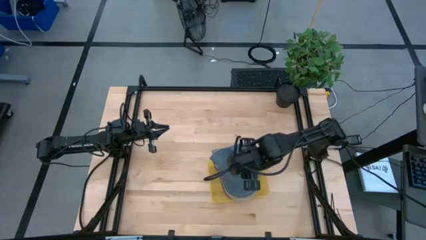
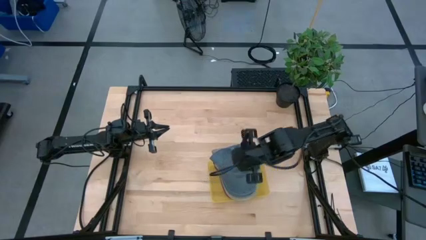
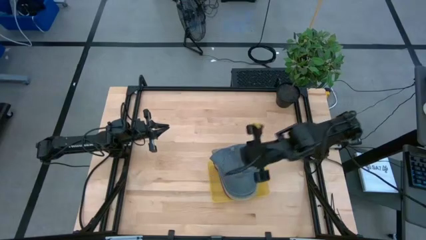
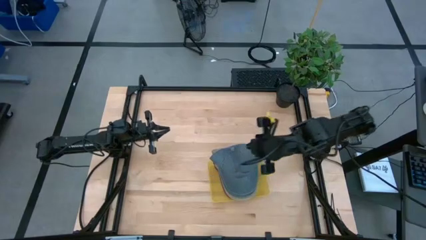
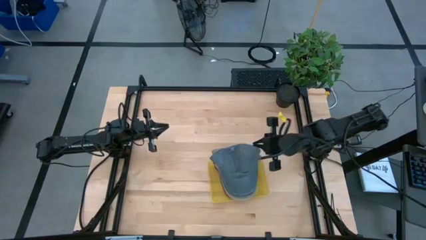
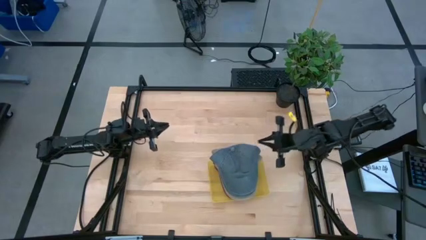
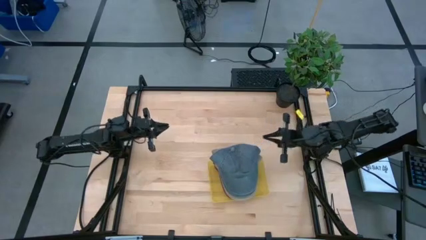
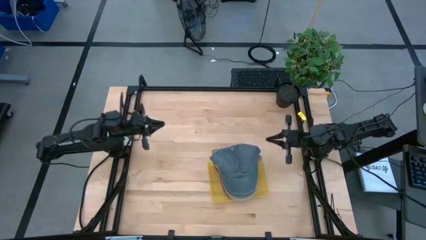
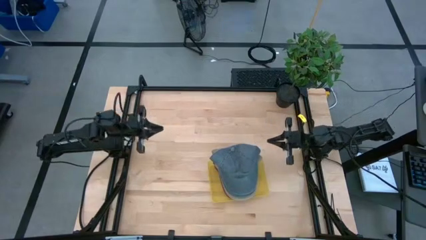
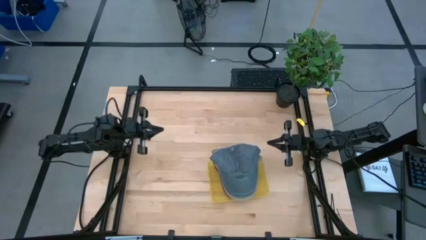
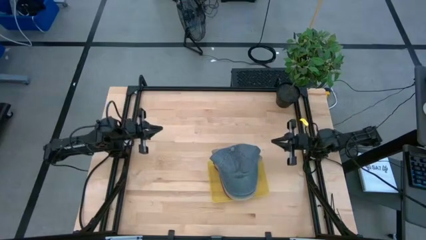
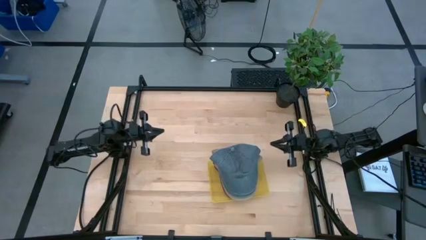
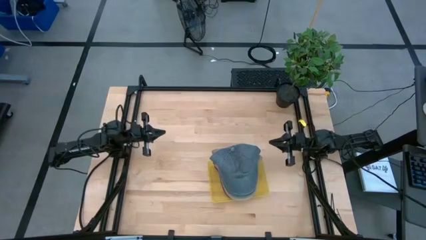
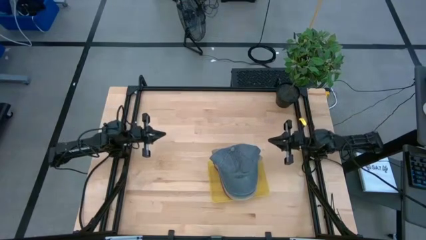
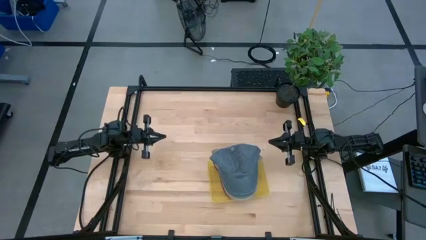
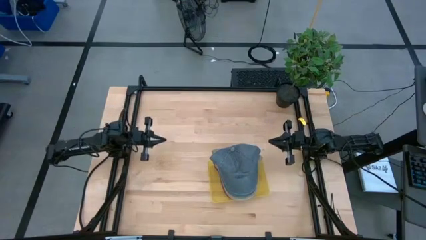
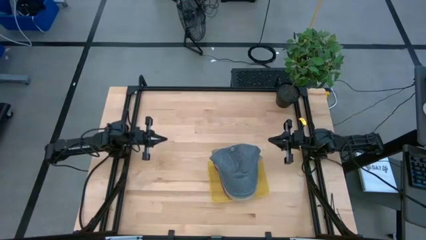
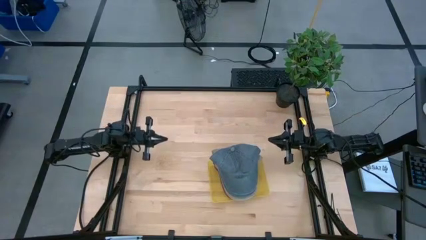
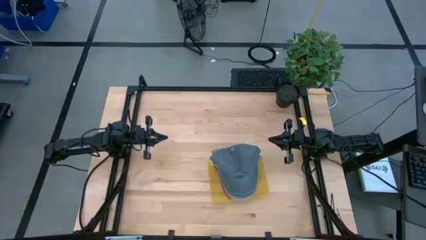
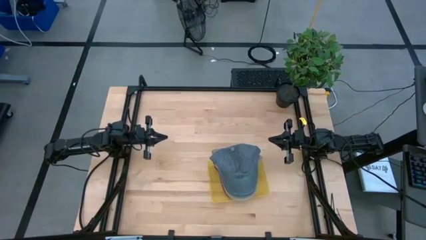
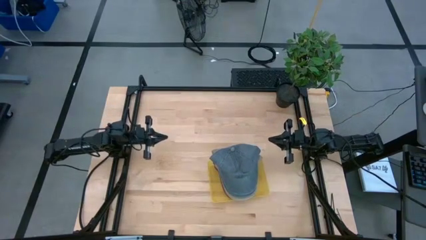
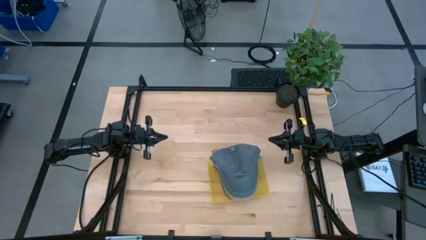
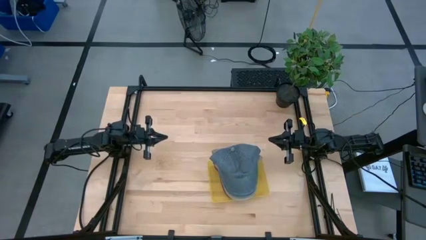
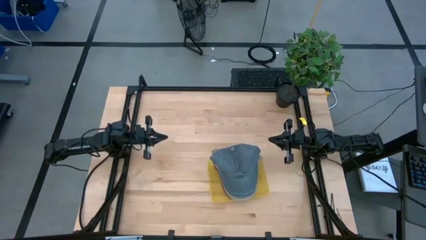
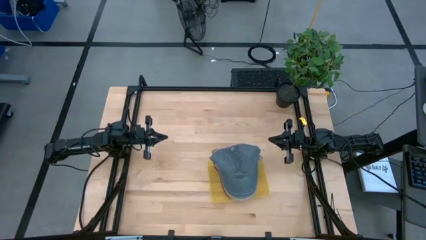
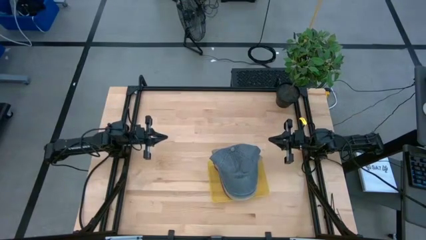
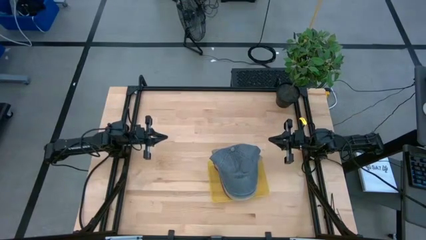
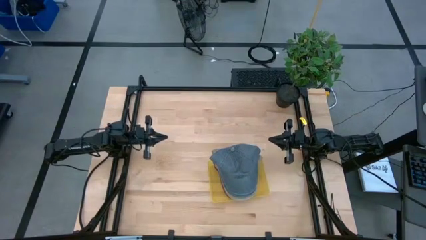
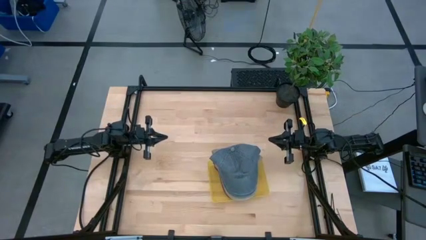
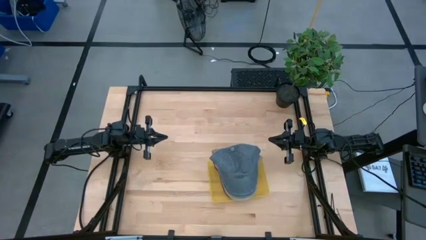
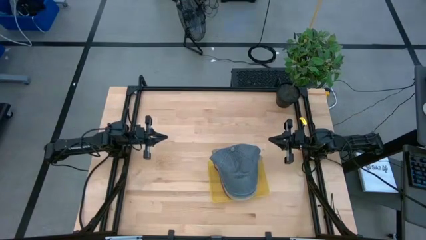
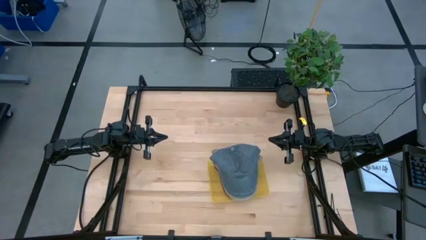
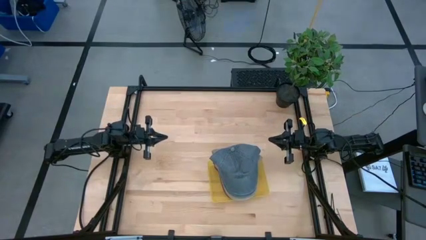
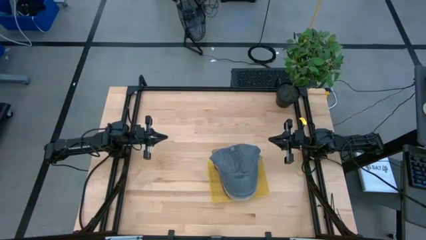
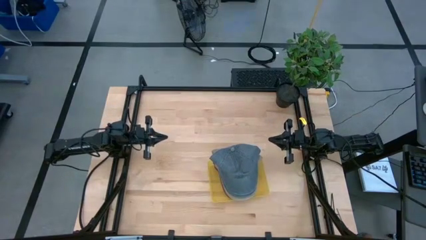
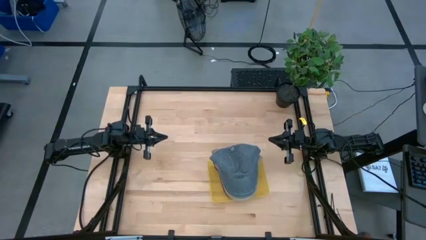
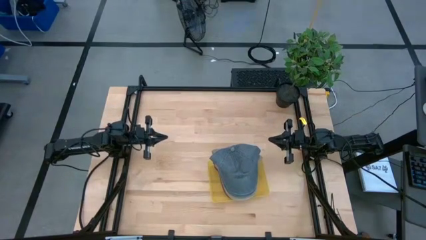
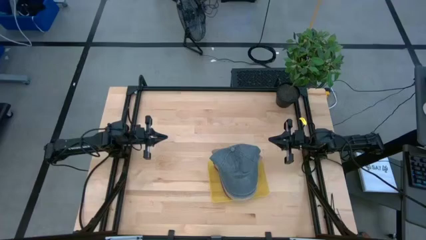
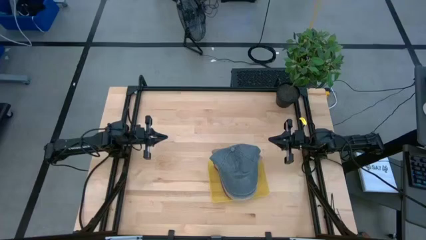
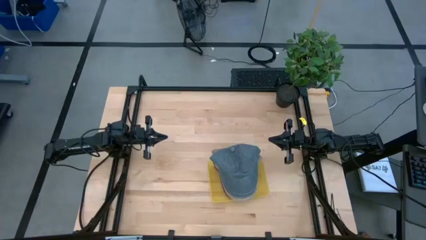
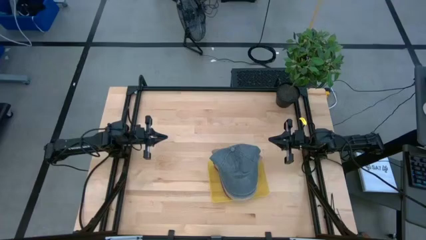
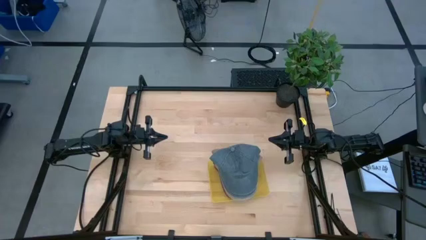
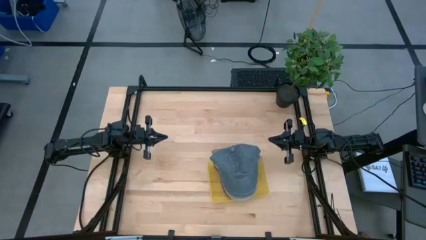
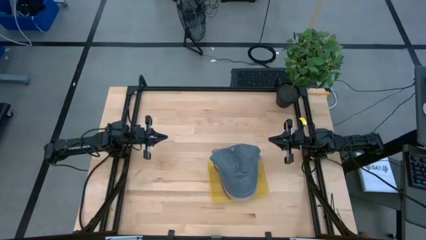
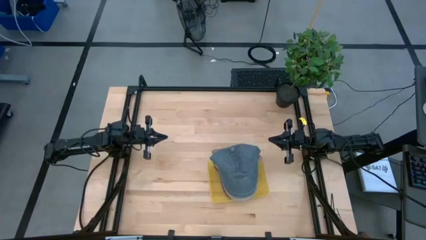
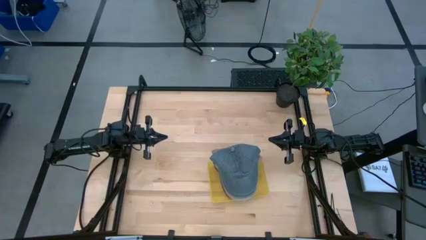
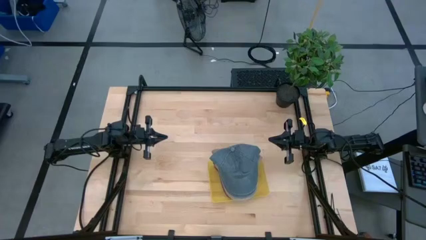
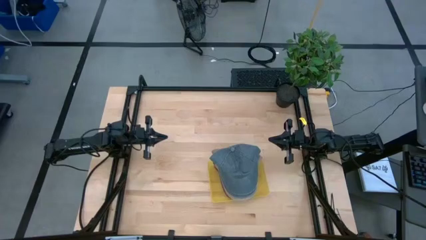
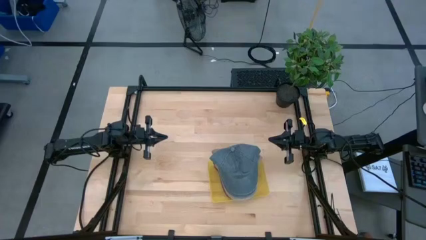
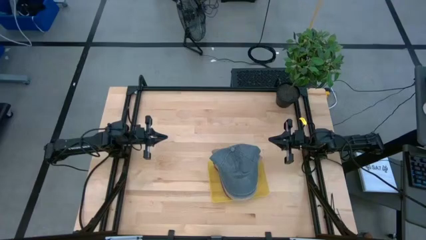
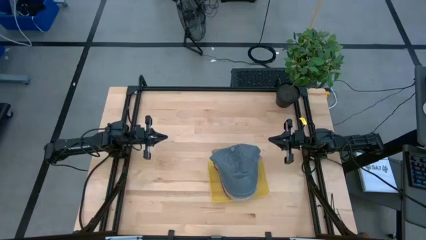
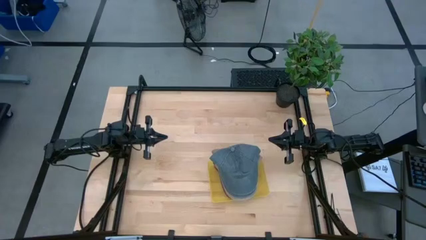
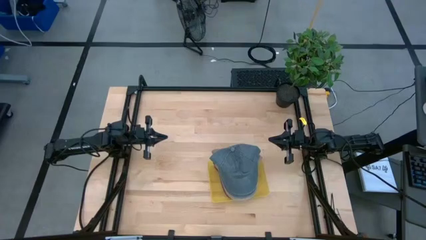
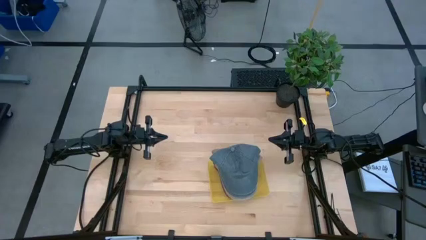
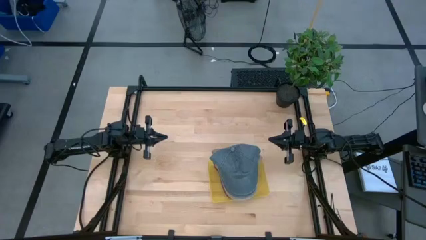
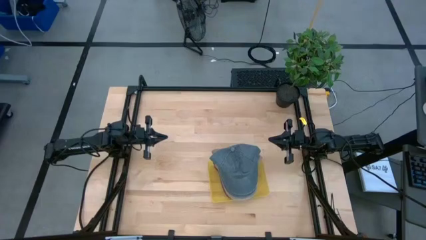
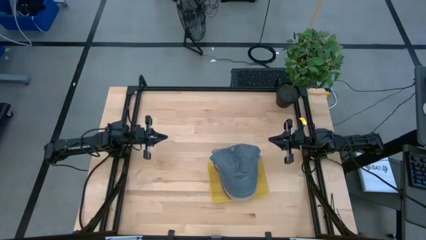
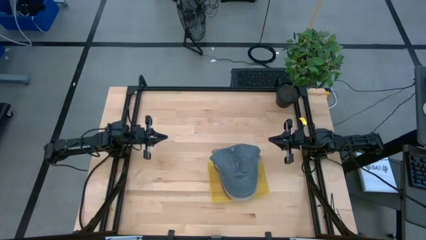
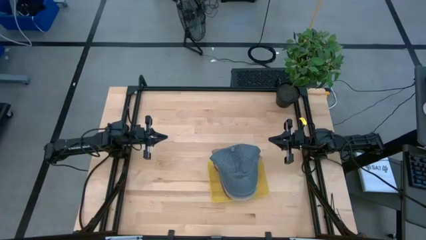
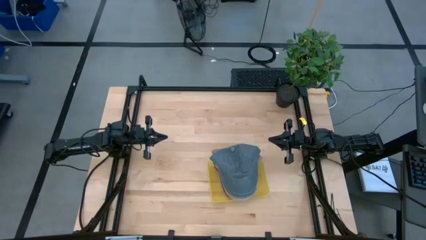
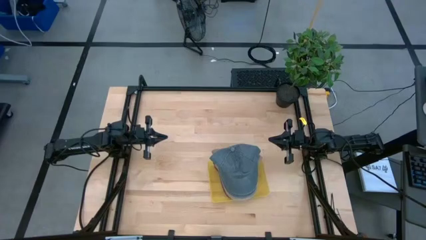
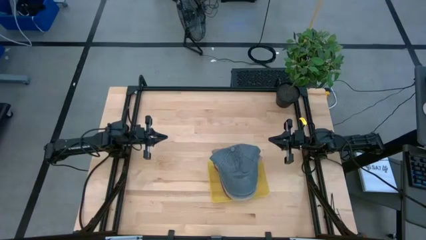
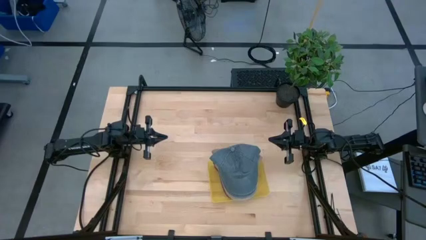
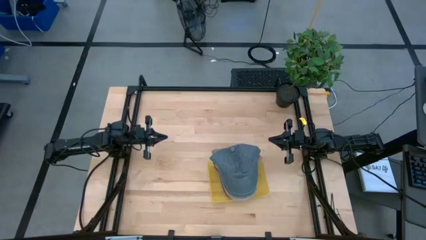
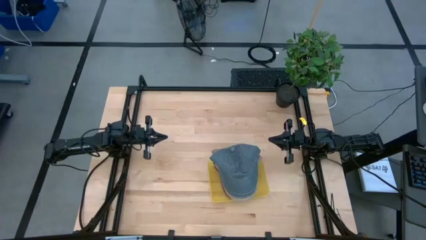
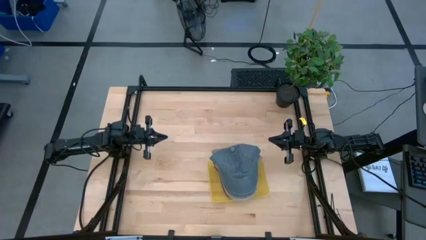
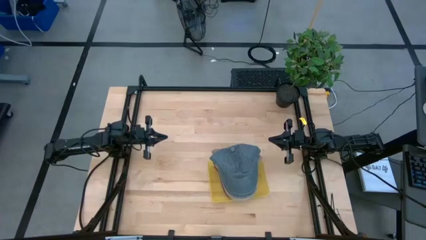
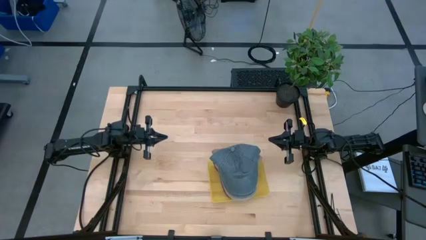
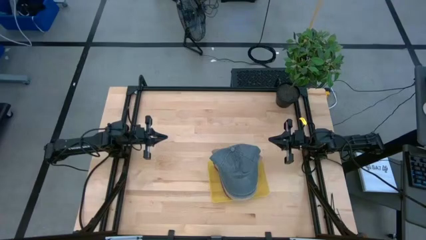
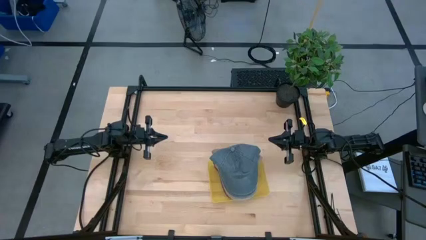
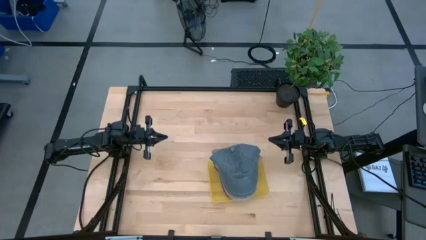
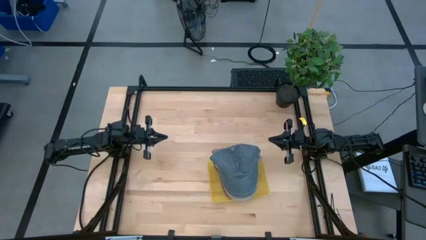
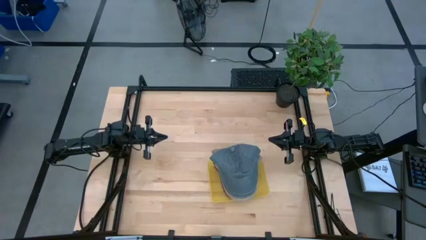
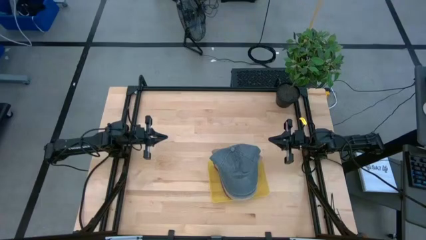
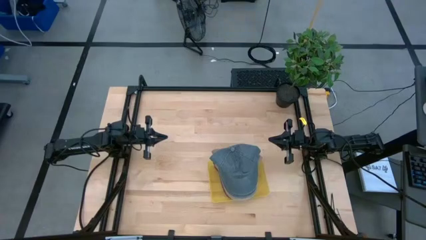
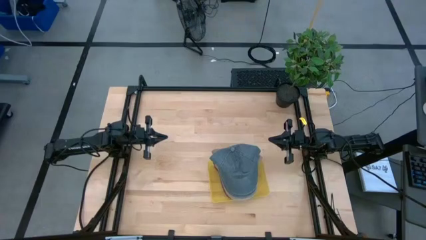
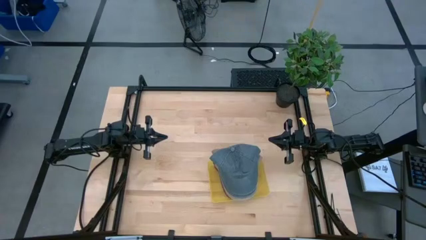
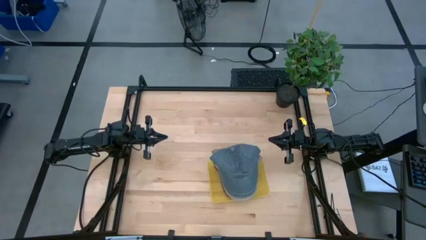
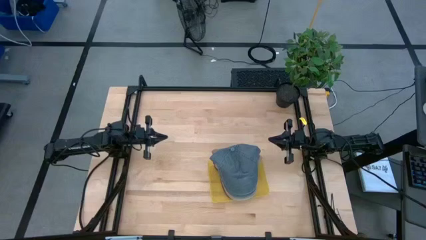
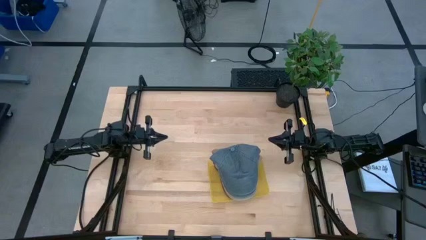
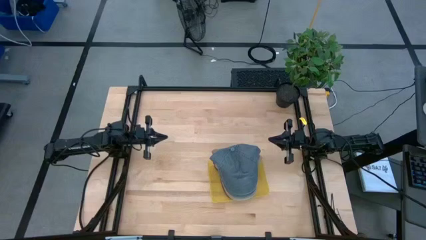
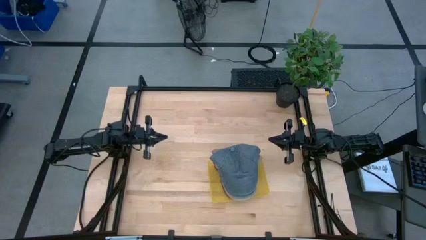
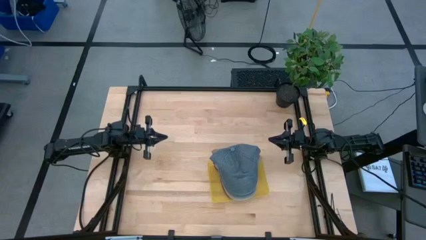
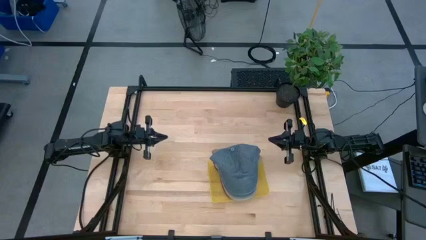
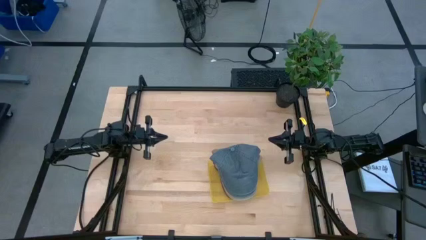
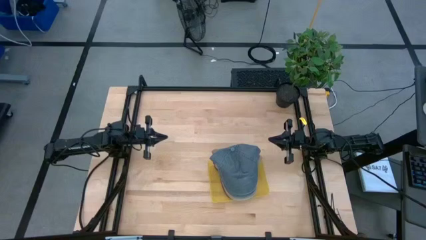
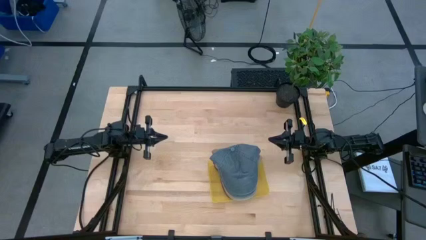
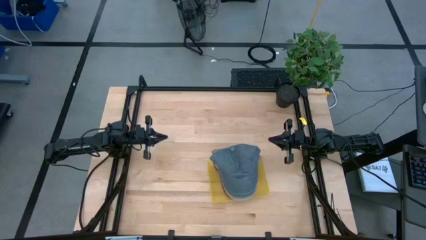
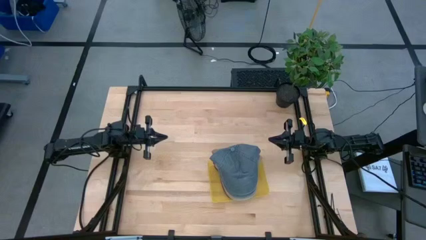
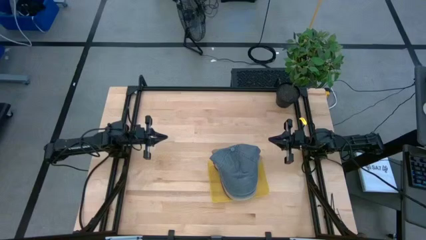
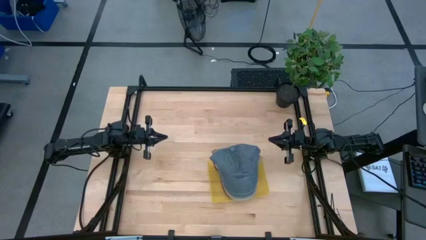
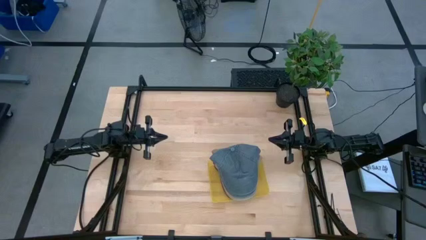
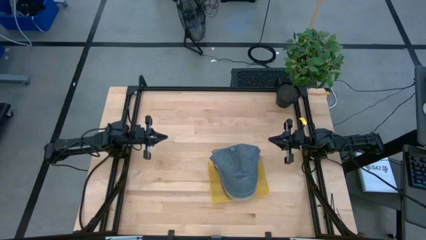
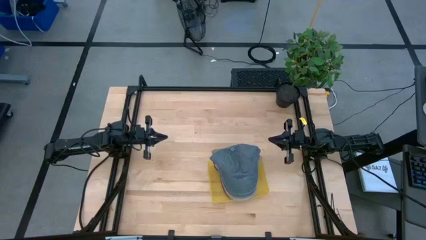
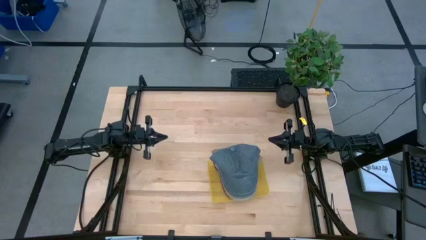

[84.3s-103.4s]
Task: Pick and place caps into container
Return to Home Position
